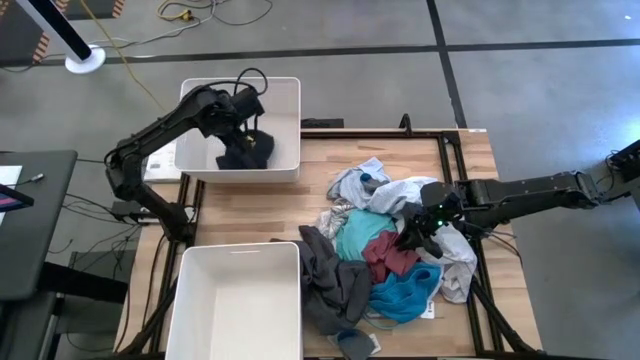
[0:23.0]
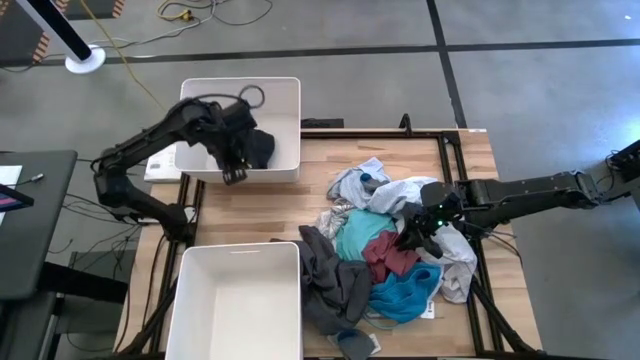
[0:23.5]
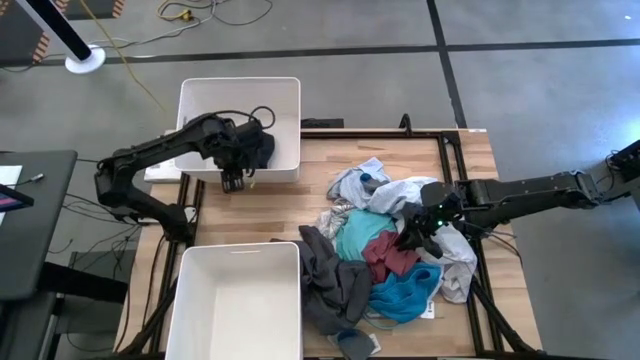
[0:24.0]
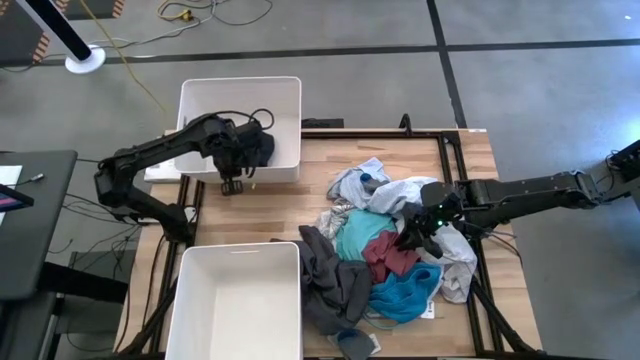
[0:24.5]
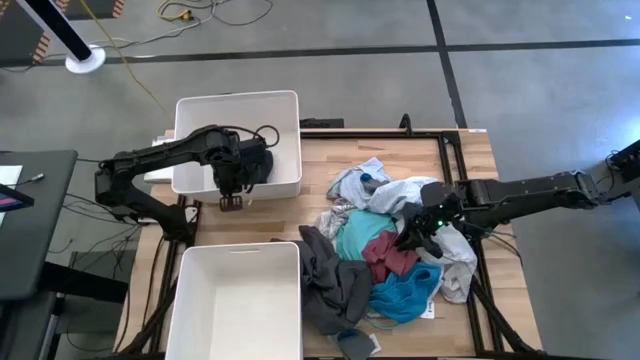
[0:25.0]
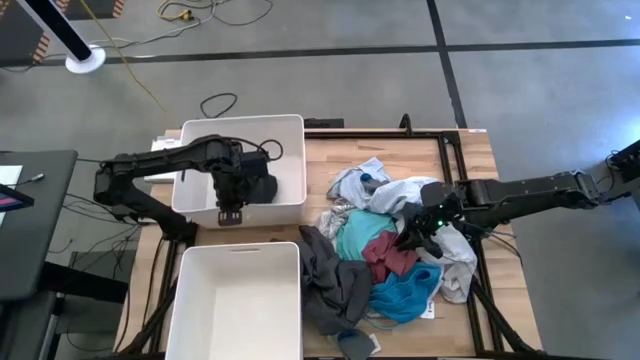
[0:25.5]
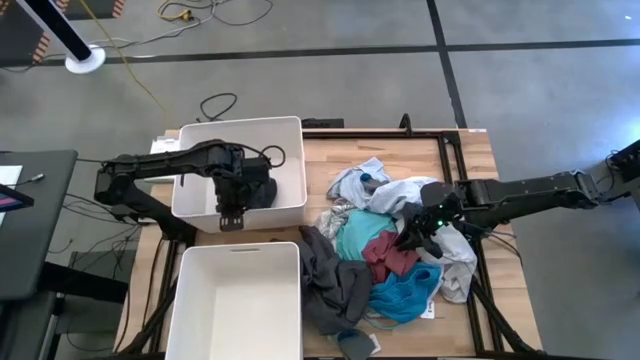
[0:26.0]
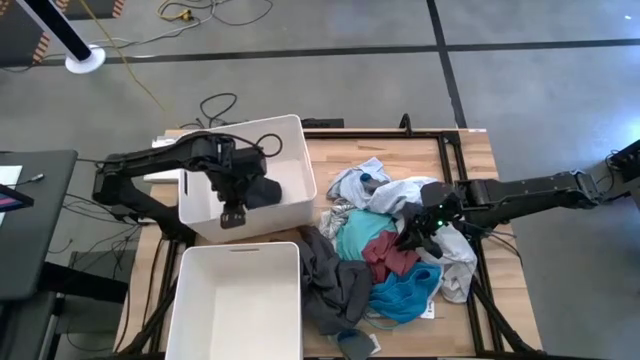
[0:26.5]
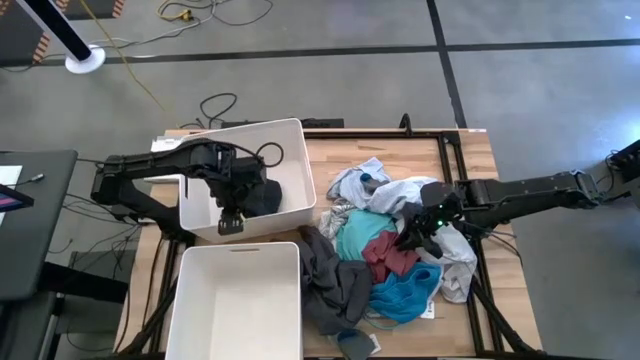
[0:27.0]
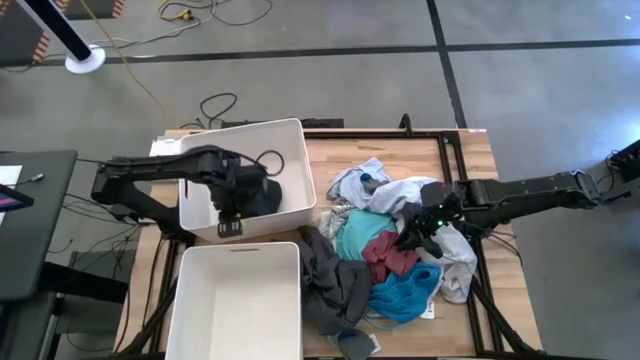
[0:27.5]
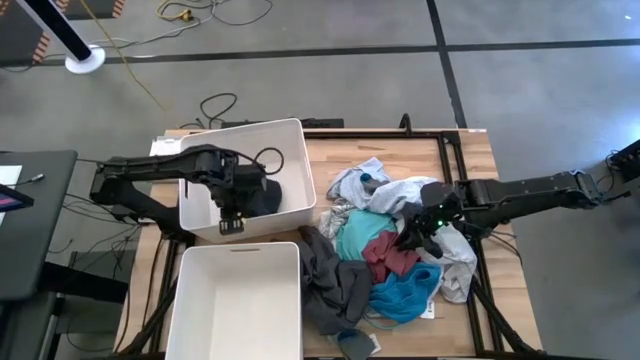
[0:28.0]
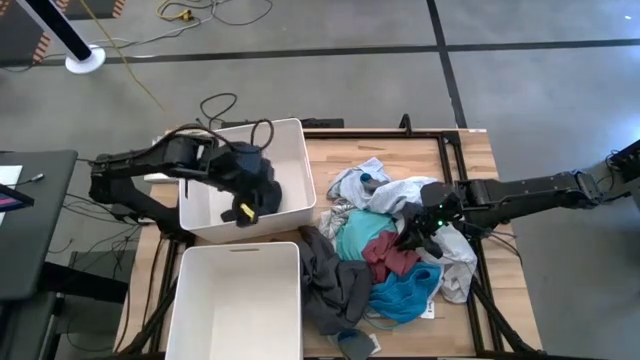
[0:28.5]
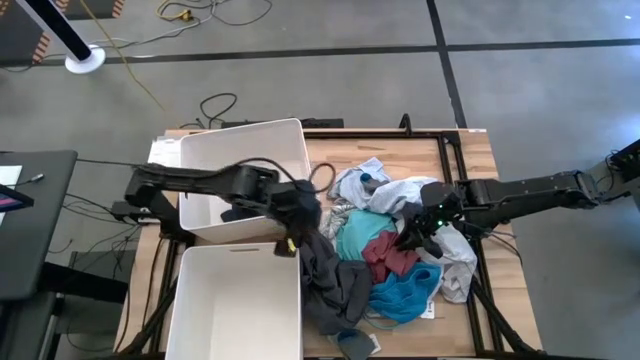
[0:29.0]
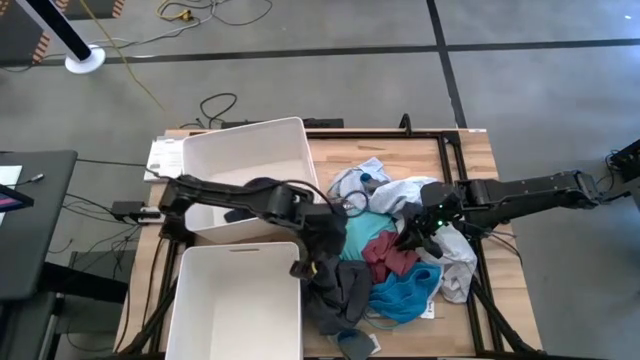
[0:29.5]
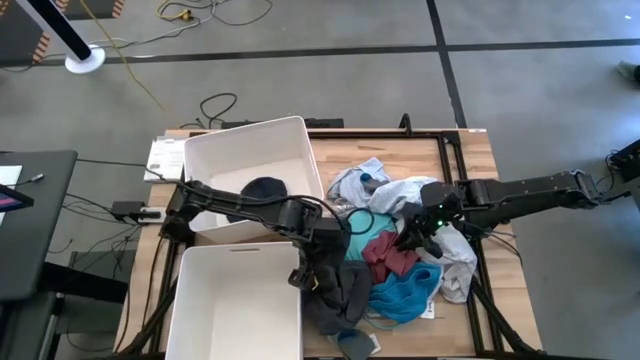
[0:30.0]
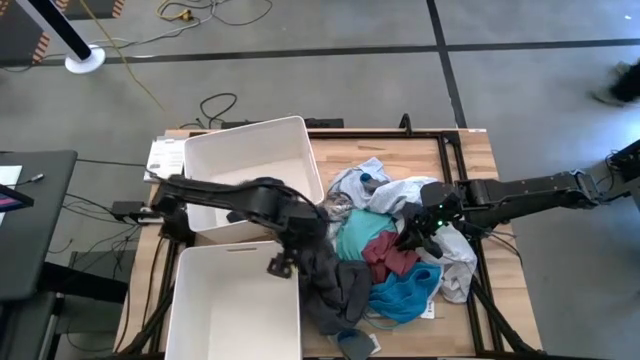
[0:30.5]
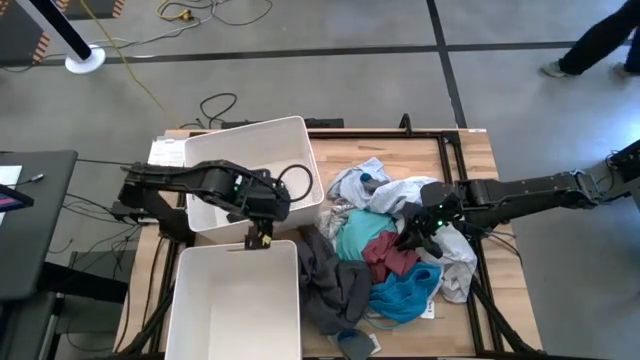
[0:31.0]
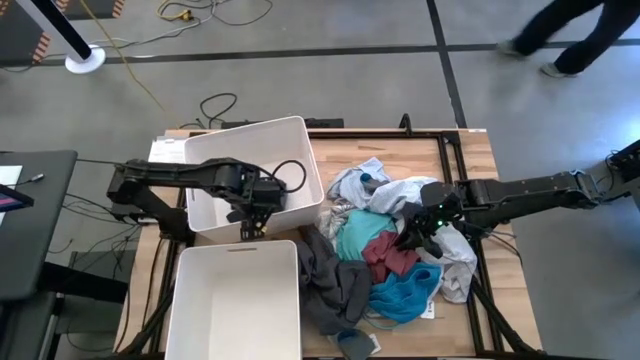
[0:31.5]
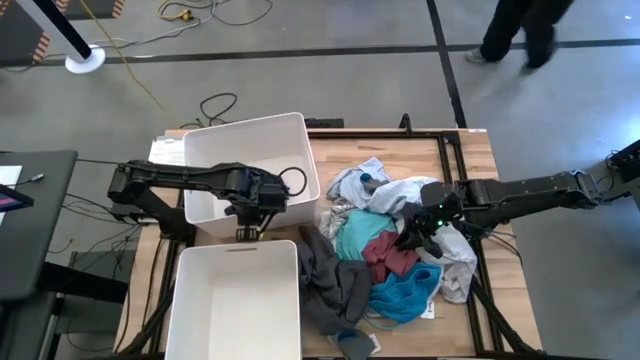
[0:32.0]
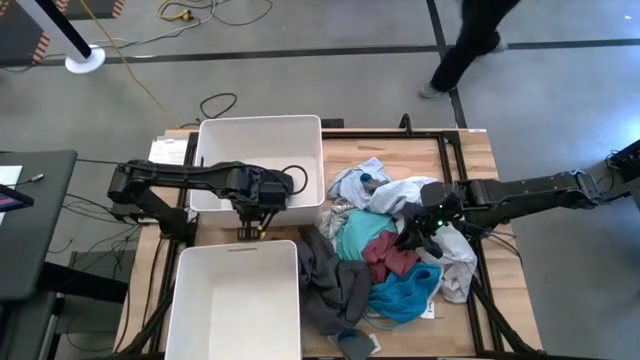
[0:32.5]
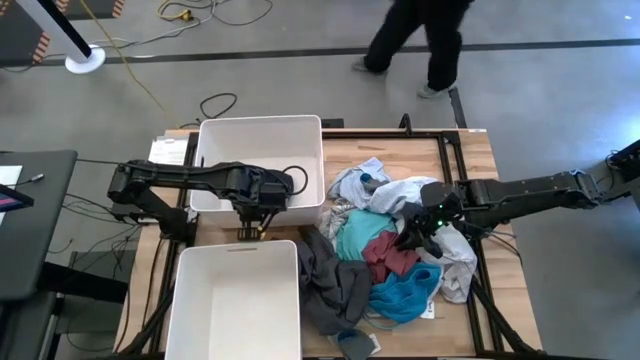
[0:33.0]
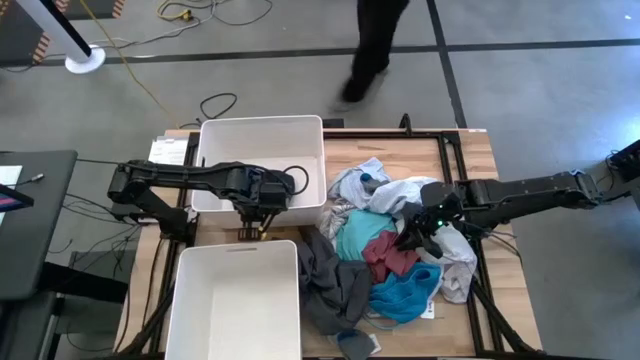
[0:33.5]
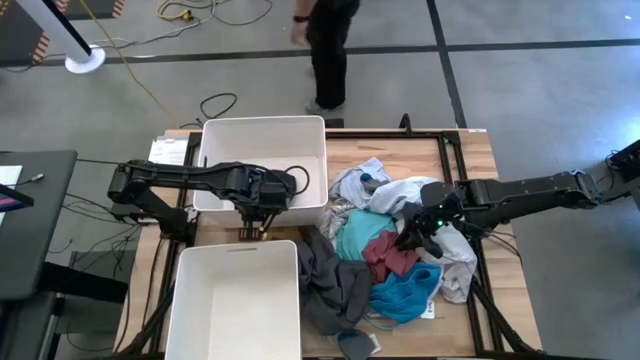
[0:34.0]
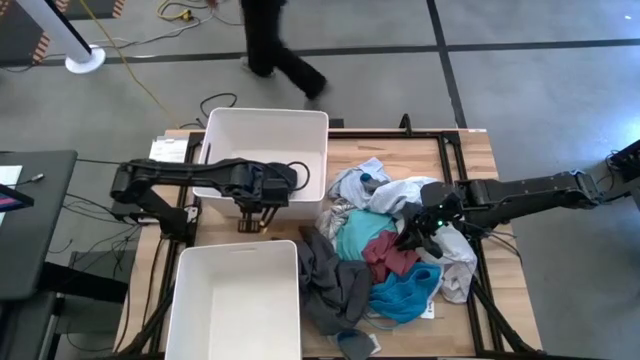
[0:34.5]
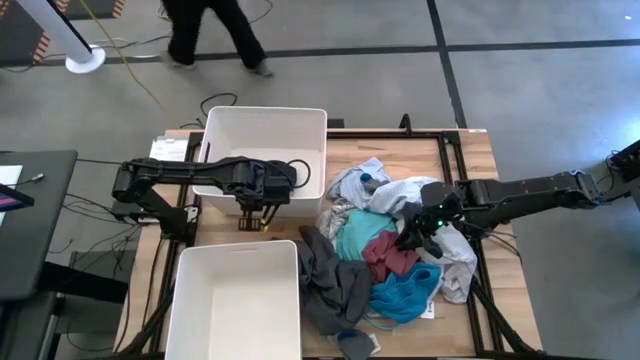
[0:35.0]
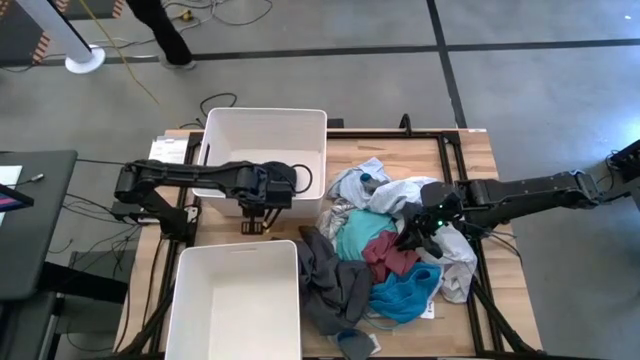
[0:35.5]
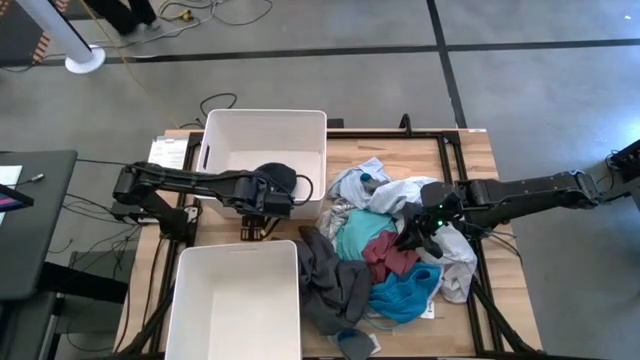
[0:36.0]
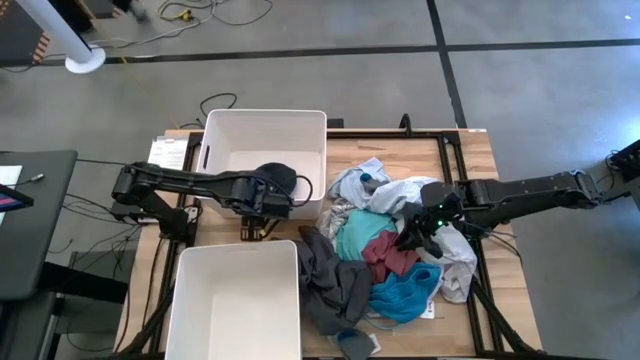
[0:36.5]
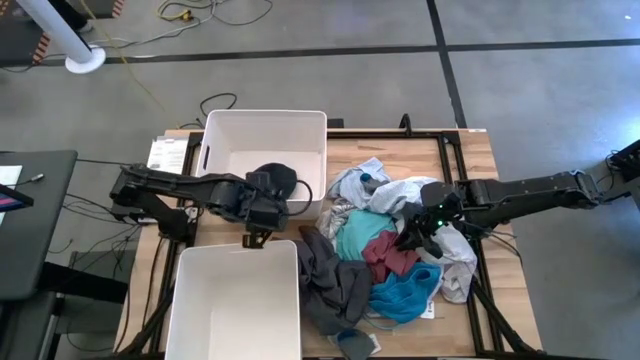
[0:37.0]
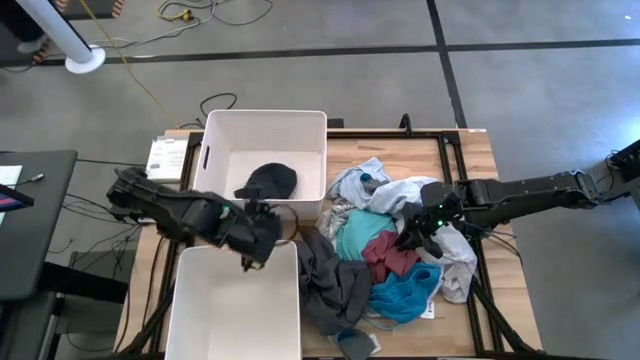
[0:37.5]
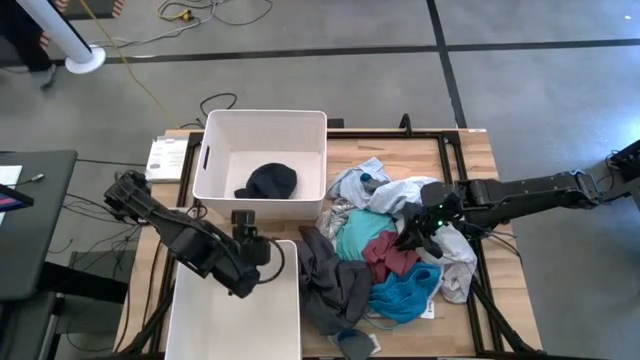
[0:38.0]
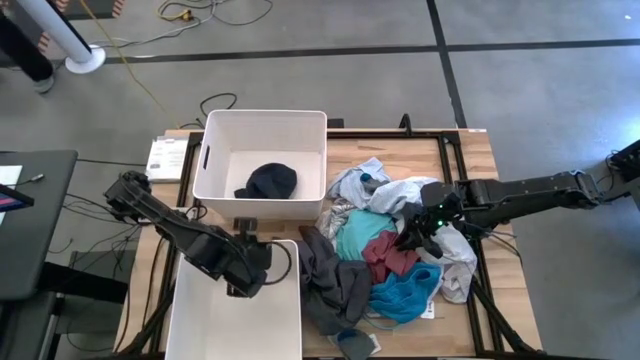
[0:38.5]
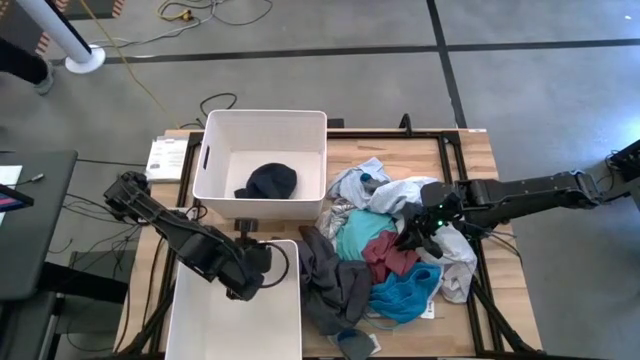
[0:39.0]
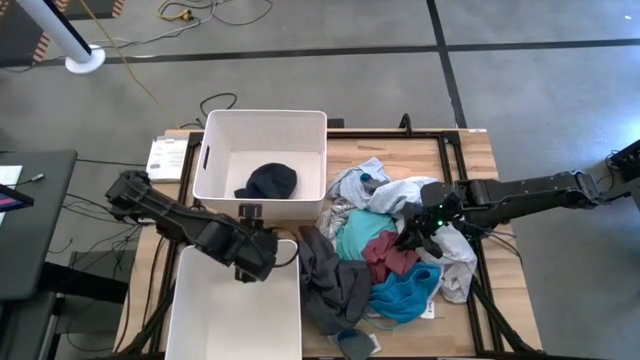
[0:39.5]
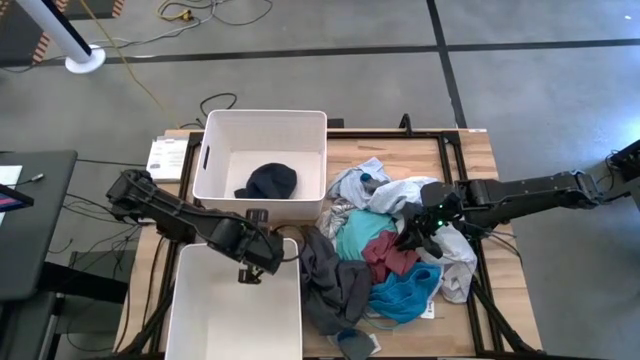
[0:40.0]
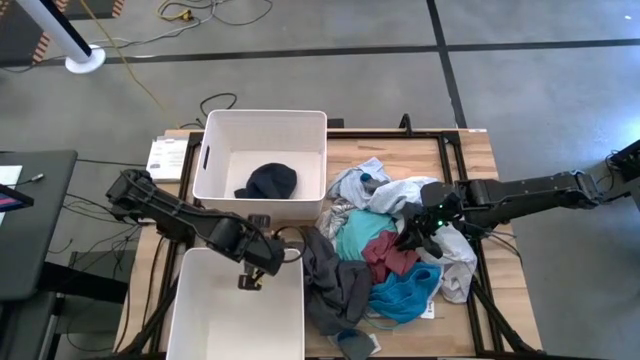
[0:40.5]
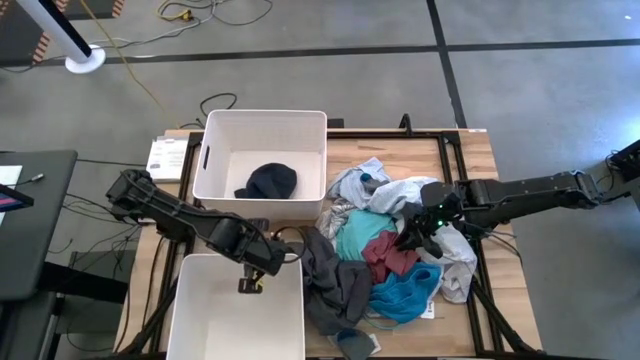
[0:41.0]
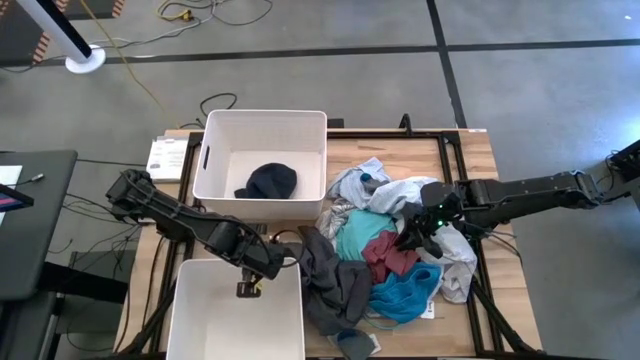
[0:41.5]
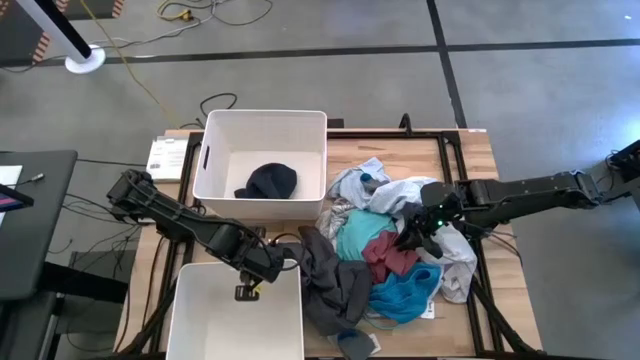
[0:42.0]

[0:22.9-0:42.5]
Task: Sort clothes
Adjust the white laundry bins

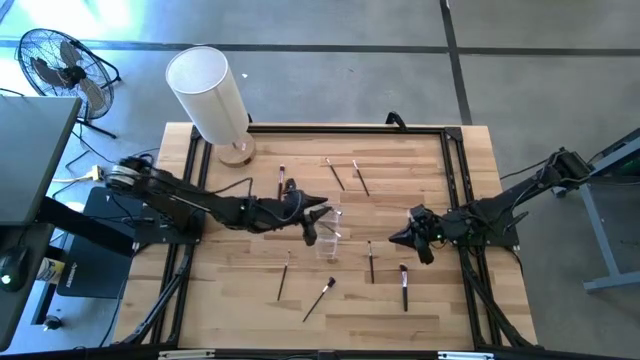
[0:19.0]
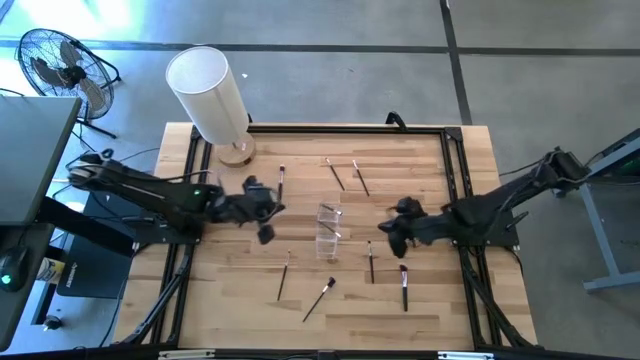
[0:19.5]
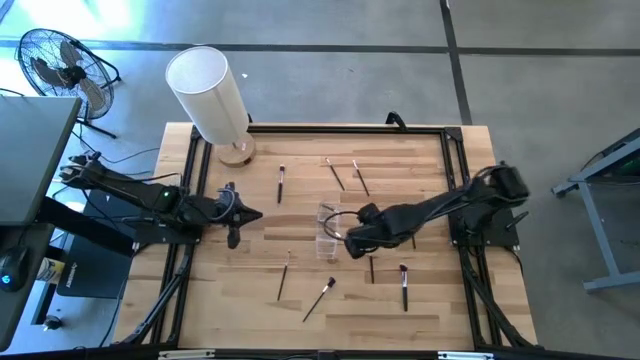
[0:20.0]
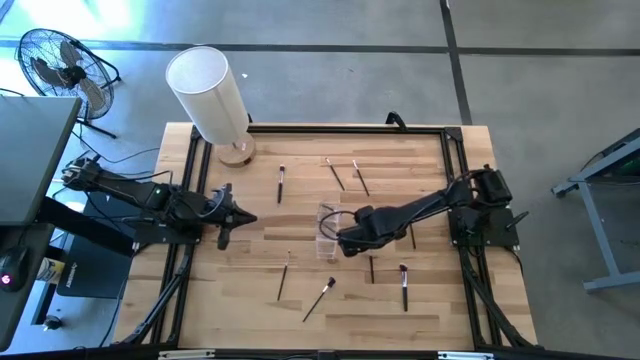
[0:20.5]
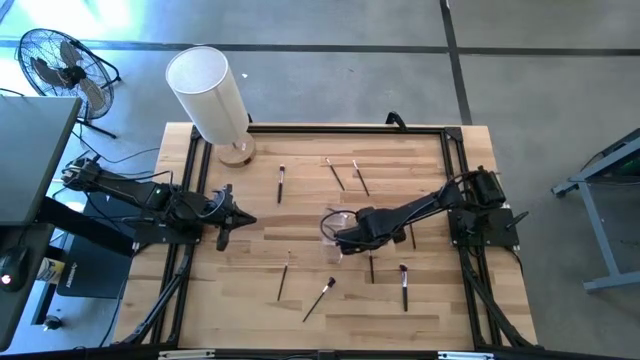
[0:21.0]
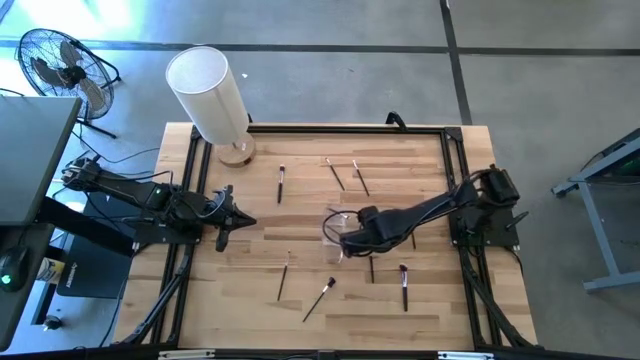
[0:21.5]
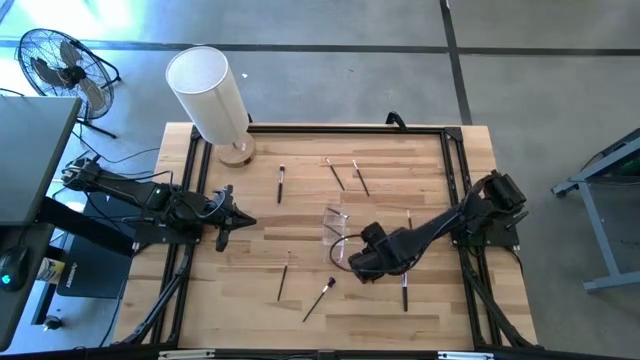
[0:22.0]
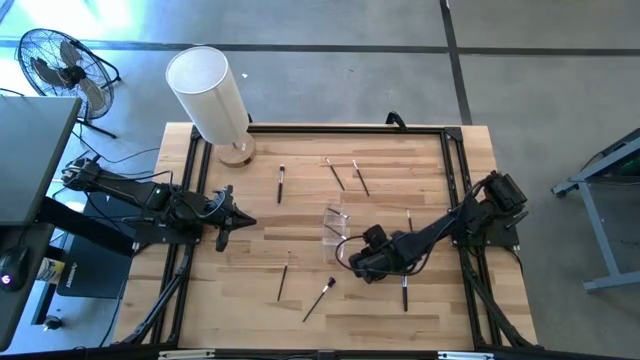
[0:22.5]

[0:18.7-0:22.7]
Task: Pick & Place Makeup Brushes
Put the eyeshadow brush into the transparent organizer
